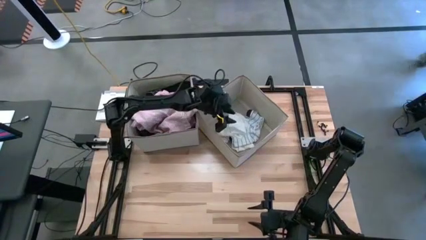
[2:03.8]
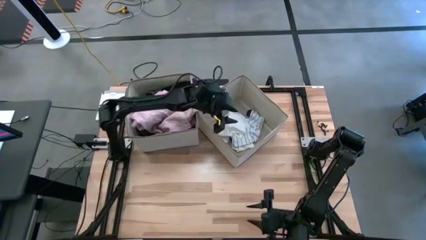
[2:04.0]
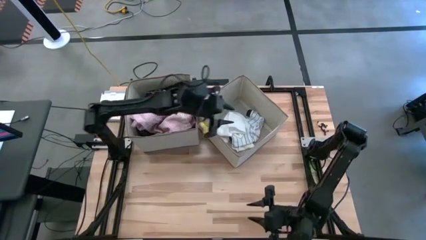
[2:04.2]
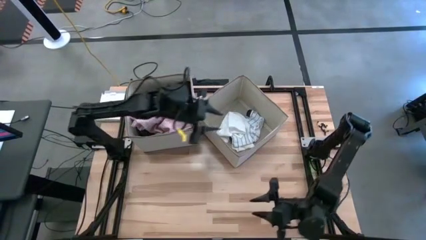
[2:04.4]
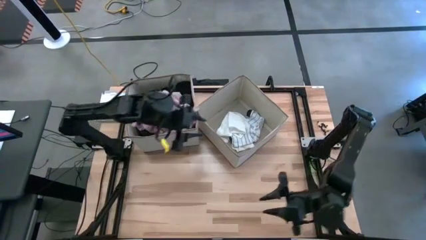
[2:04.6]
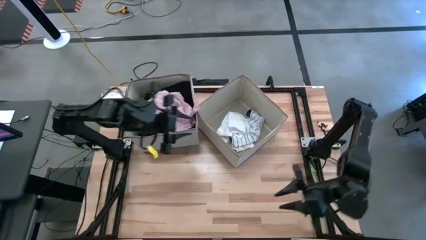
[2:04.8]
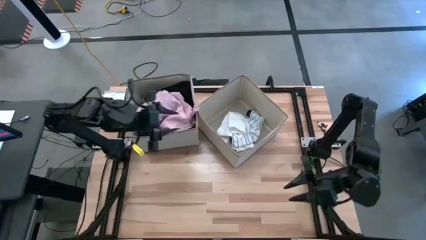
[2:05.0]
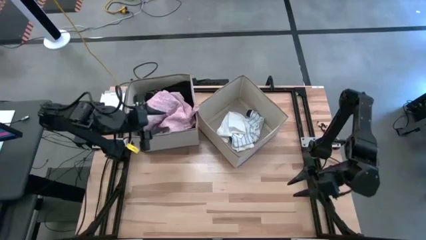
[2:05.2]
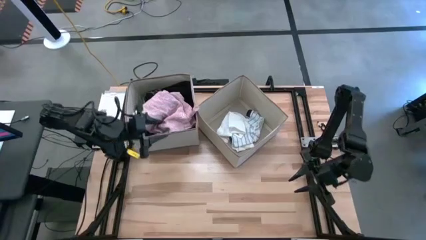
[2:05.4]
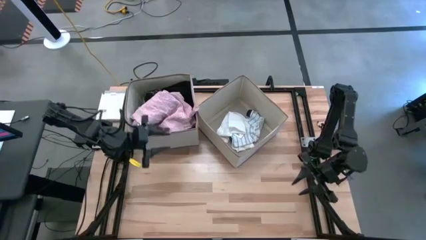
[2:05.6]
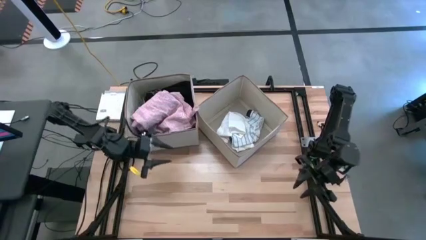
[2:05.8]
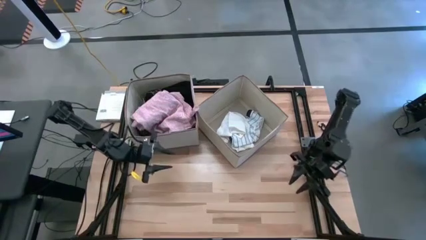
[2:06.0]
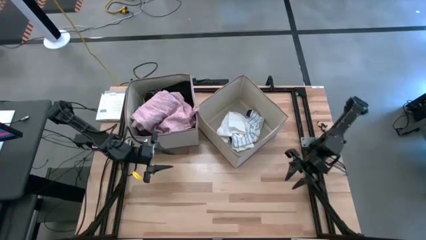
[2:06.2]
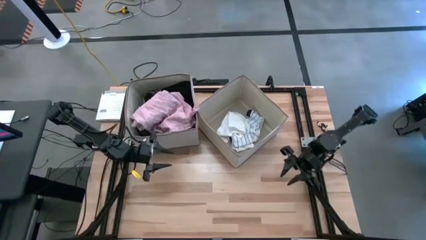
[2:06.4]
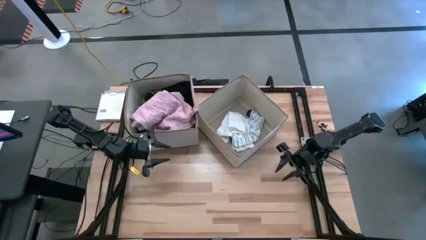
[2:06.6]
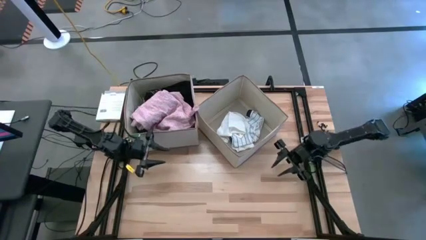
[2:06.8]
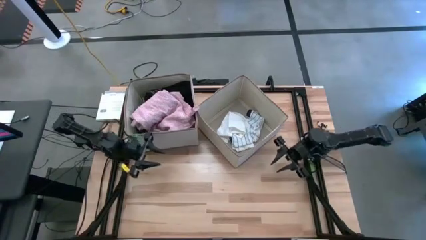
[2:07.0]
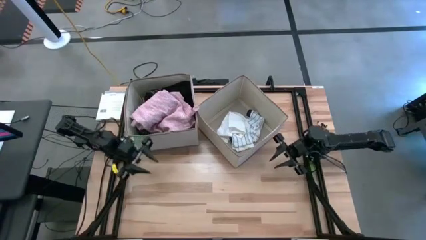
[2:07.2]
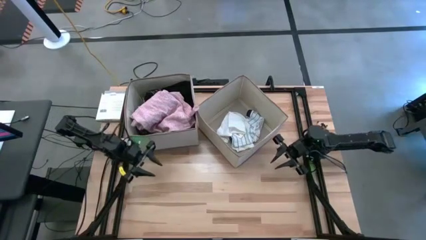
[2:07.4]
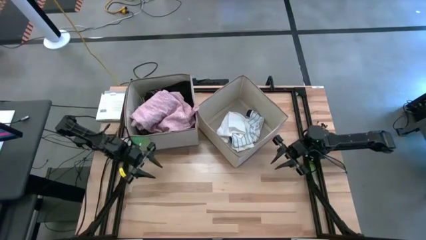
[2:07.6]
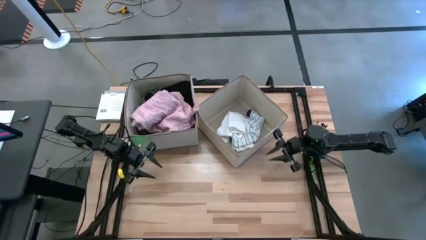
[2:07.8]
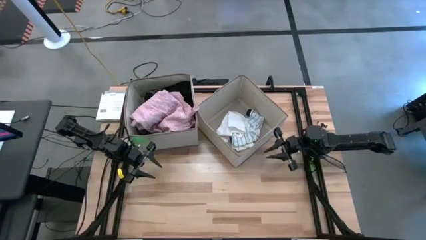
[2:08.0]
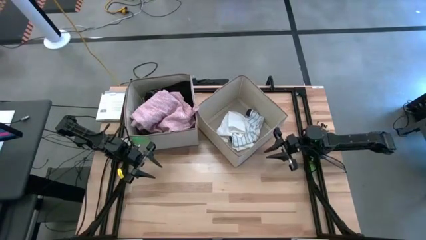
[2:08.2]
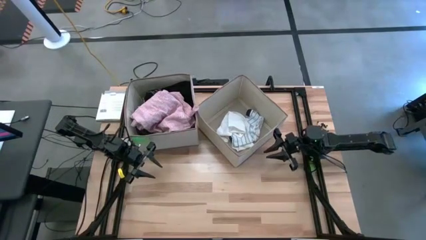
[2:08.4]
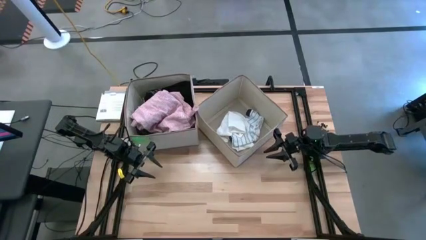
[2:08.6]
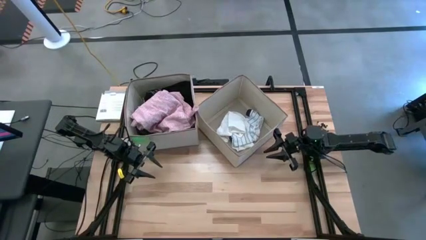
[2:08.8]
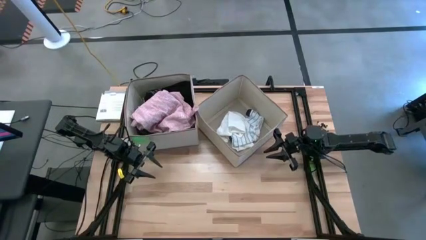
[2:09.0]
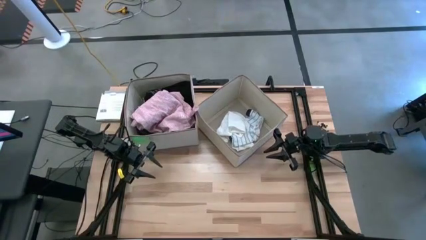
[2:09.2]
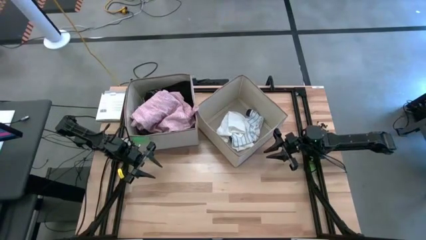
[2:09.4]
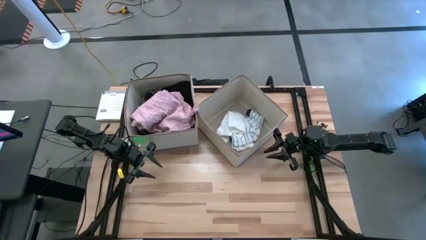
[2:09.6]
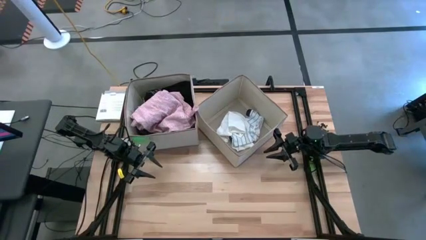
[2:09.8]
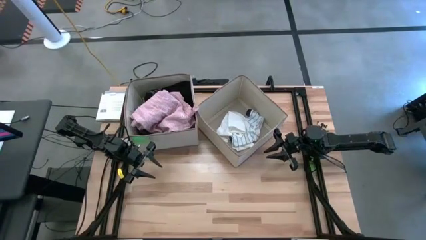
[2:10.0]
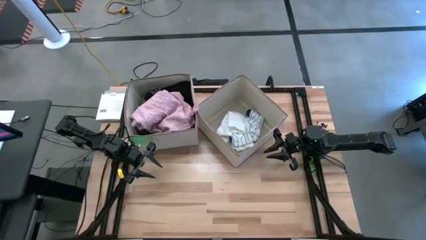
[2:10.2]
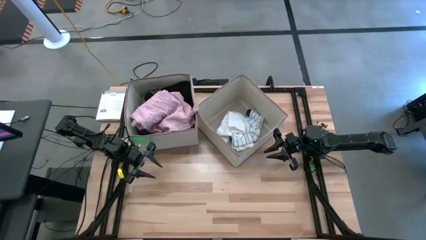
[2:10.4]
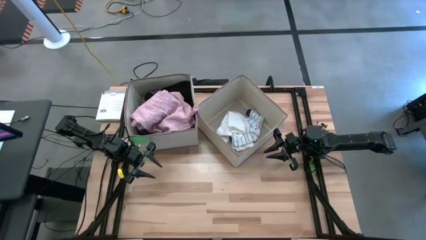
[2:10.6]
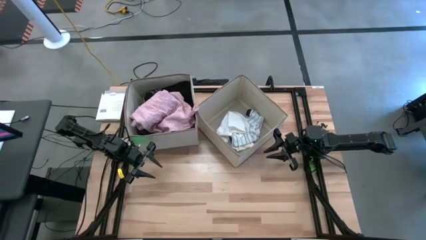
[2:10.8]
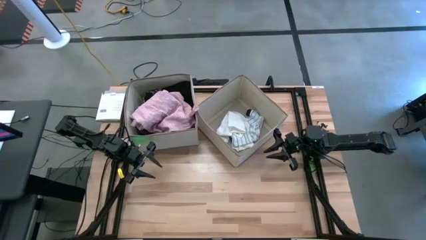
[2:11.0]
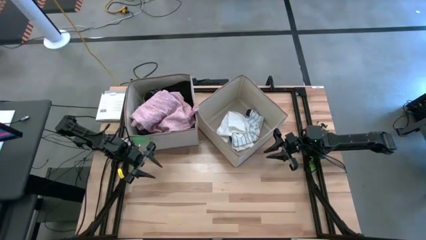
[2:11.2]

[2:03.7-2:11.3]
Task: Sort clothes
Return to Home Position

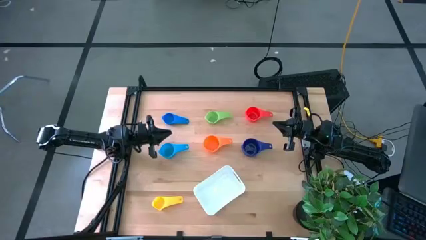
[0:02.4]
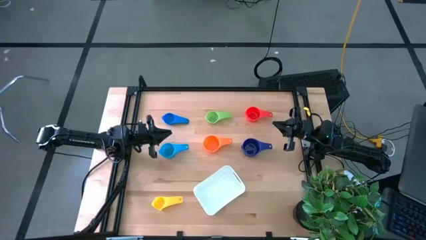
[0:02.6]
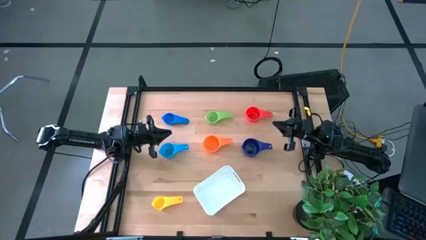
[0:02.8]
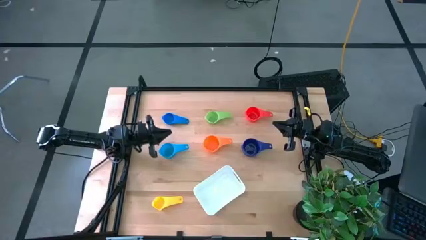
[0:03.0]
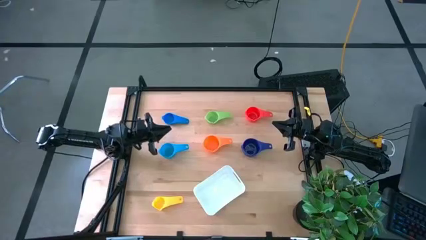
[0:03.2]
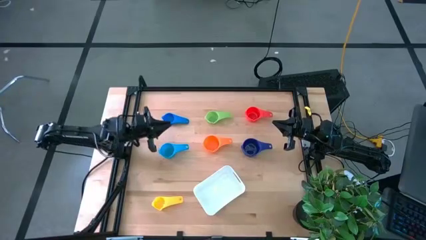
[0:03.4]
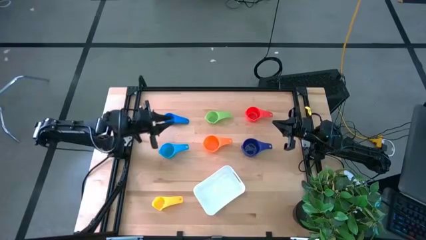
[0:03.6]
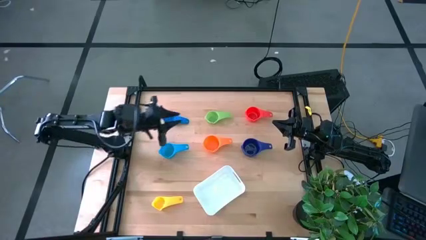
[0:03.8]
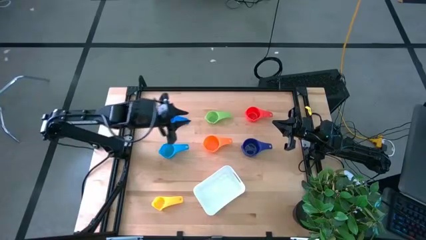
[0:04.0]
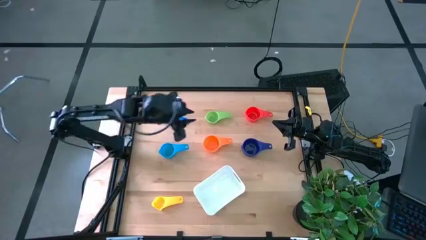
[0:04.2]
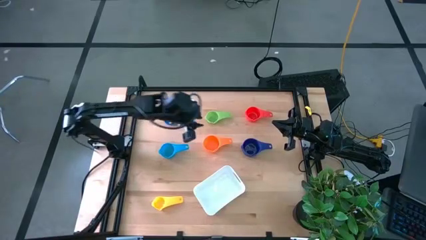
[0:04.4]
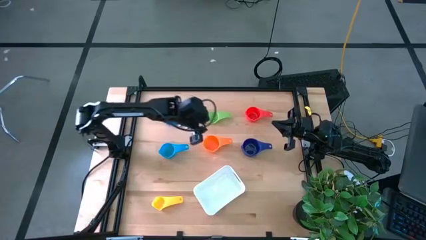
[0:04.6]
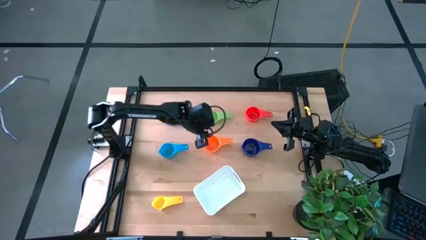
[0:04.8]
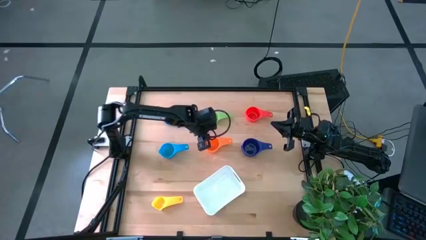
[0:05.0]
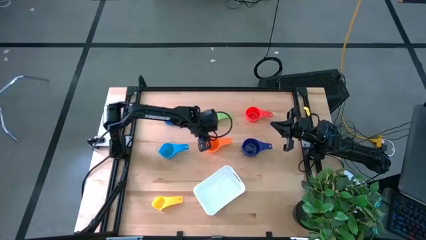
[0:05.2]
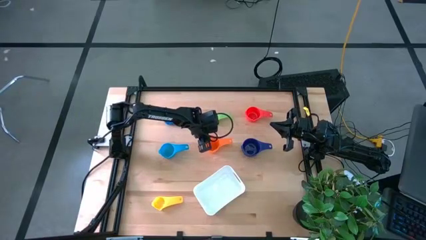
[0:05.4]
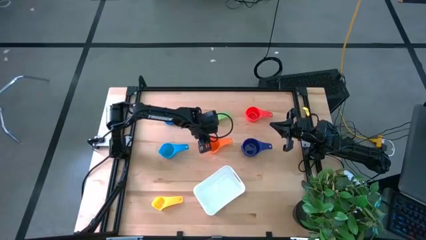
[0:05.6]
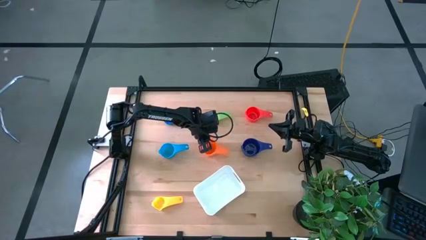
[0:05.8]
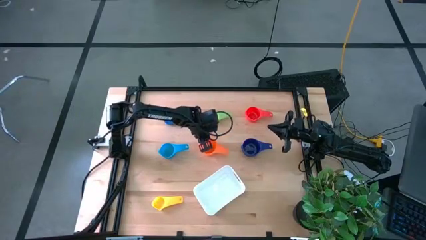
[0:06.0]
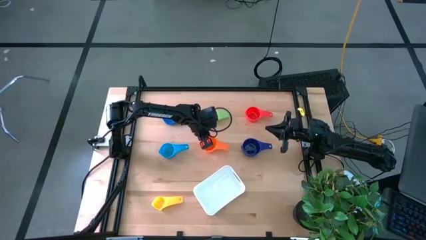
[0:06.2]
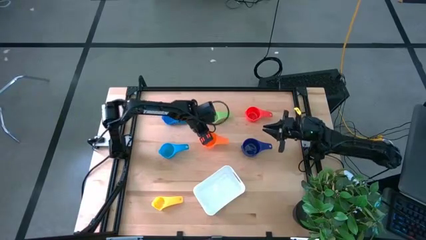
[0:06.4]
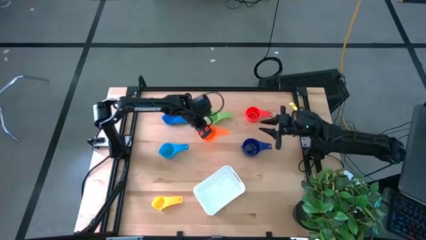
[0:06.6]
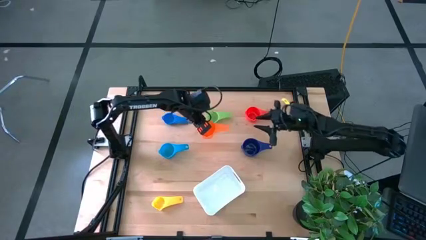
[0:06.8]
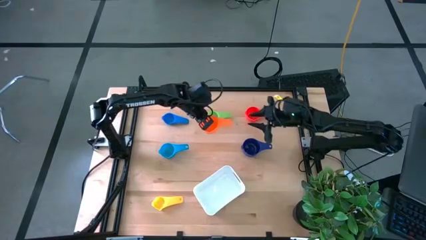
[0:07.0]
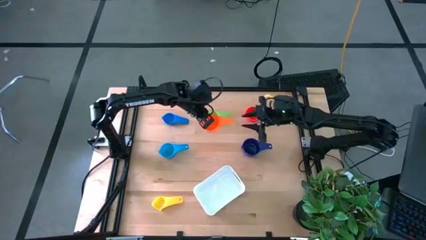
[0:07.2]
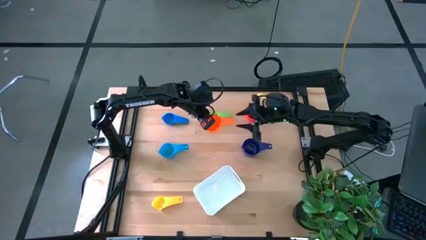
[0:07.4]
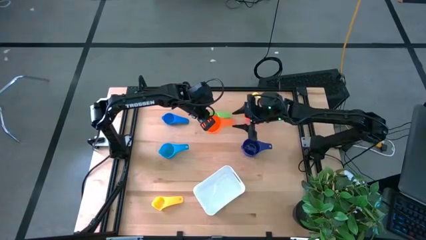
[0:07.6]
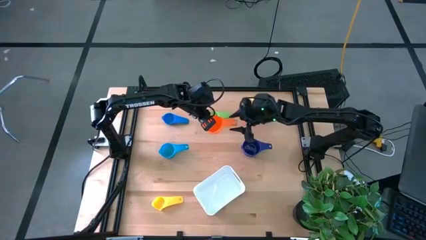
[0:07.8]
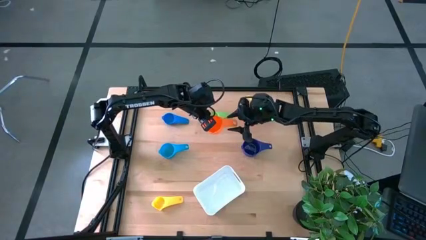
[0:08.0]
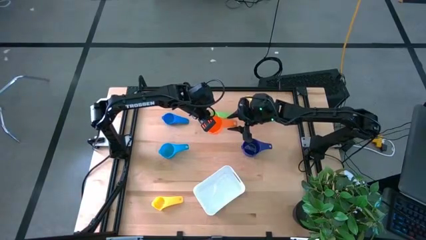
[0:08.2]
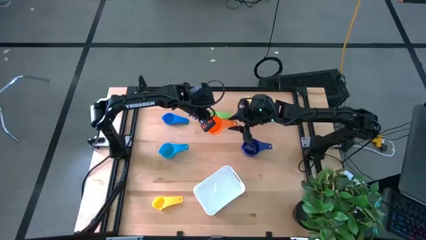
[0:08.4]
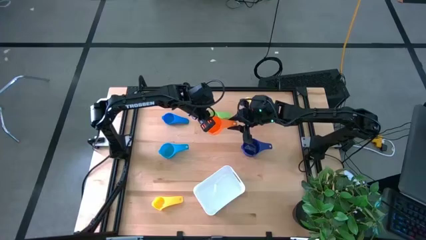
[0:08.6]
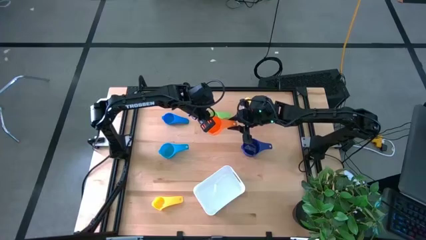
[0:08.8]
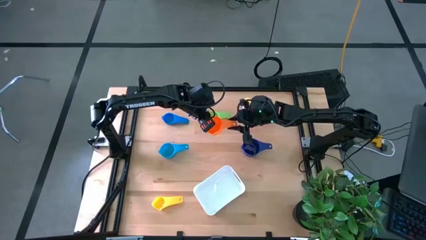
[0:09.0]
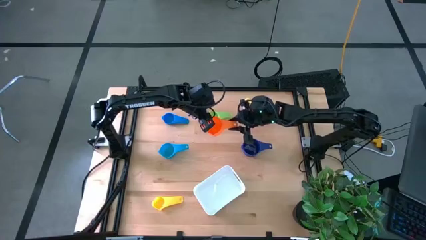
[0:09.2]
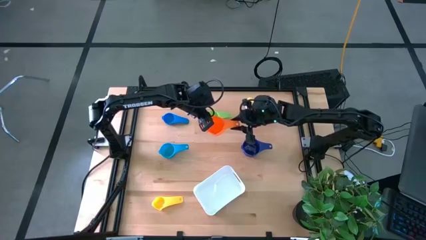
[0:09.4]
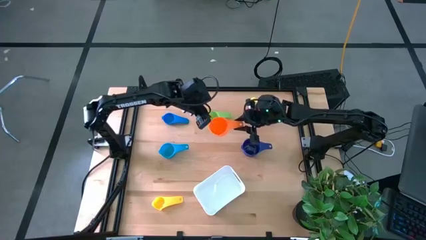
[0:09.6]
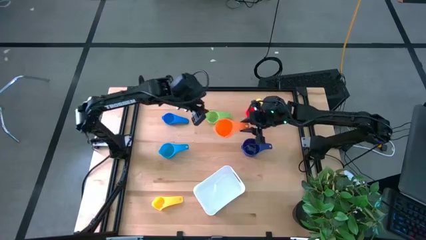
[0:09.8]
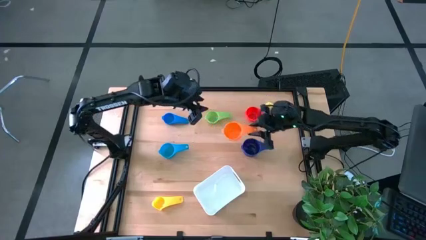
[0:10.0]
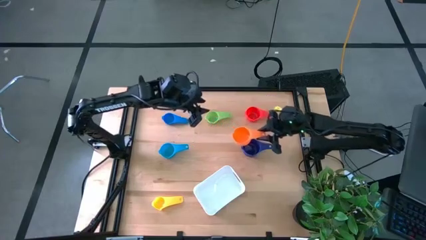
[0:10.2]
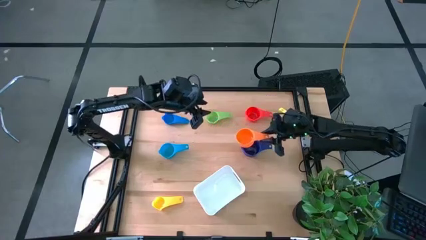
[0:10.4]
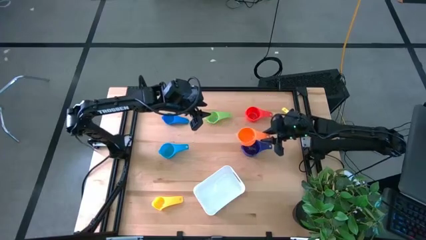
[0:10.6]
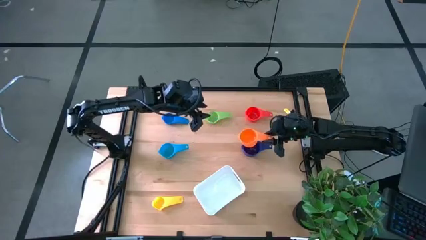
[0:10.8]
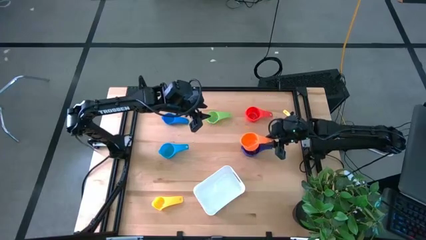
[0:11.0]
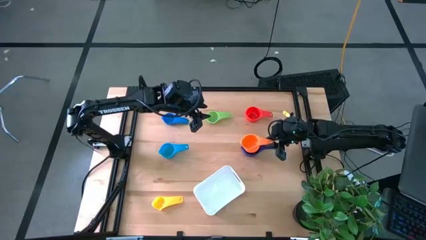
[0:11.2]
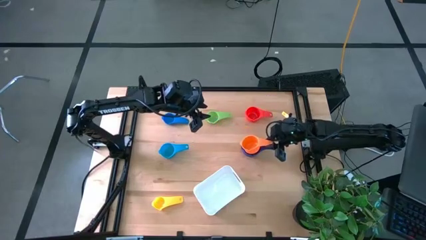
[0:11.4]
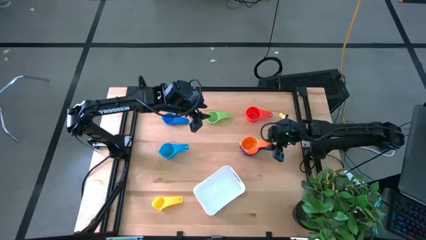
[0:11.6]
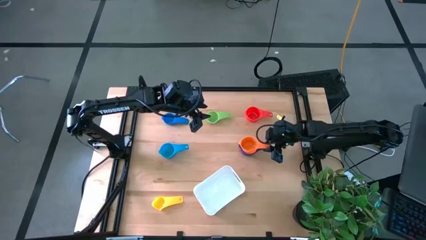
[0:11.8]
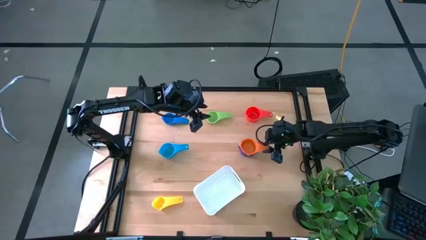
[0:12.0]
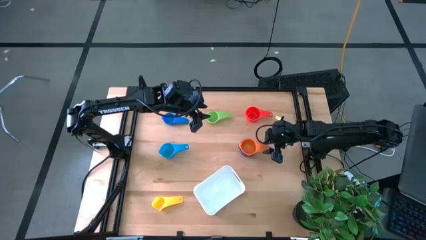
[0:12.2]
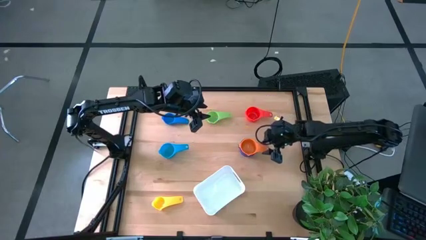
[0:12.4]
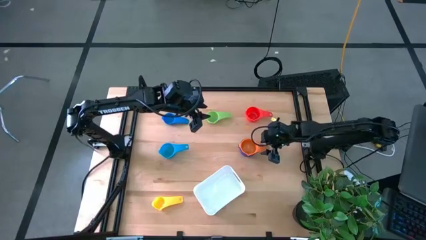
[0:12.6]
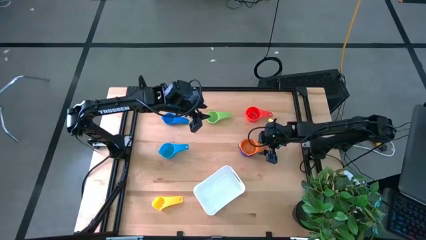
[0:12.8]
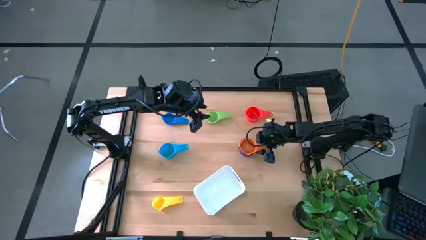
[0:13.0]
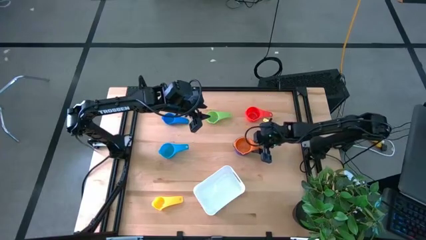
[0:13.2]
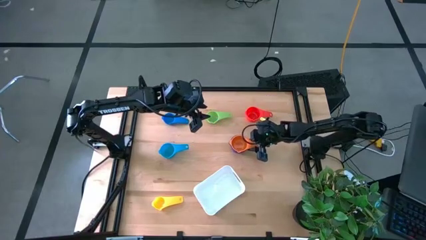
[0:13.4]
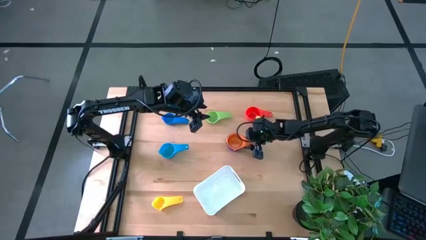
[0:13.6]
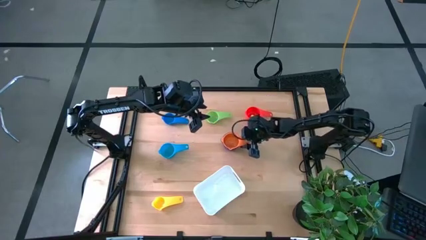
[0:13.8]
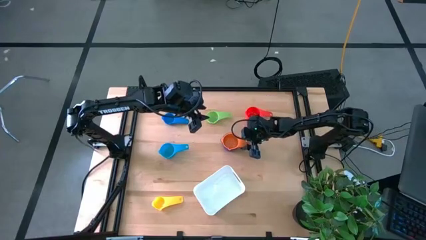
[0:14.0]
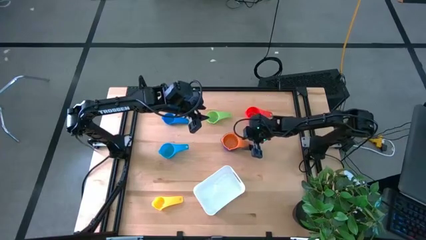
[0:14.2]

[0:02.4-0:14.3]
Task: Nest measuring cups in basket
Stack the orange measuring cup on top of the purple measuring cup
